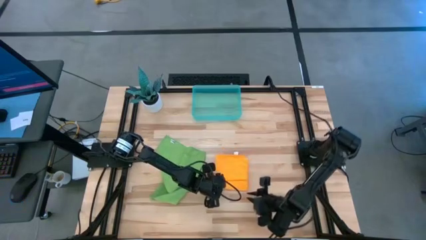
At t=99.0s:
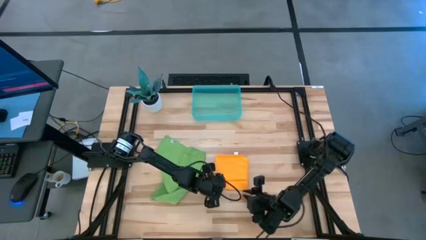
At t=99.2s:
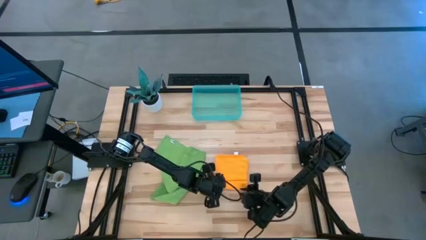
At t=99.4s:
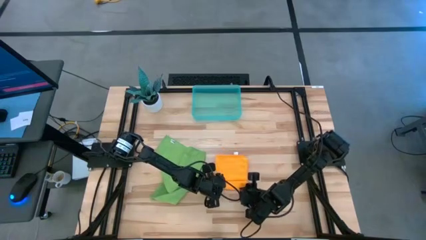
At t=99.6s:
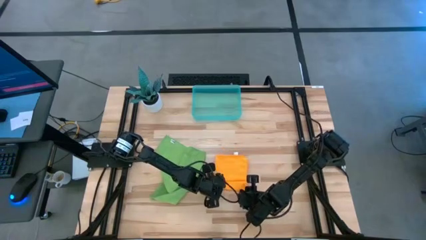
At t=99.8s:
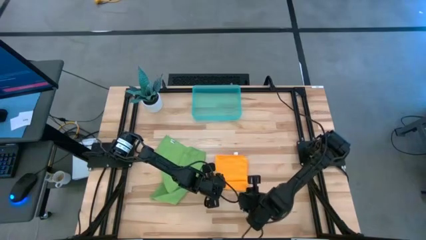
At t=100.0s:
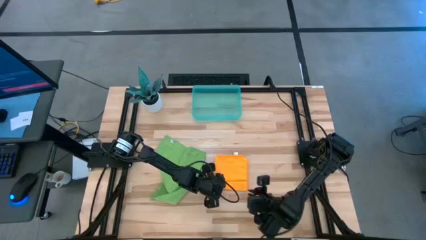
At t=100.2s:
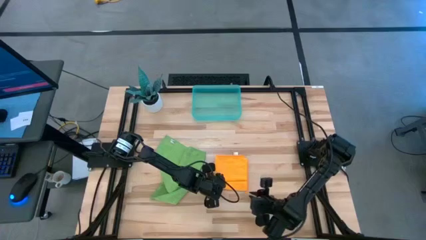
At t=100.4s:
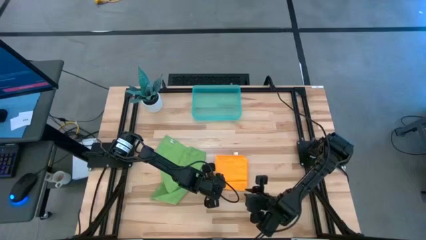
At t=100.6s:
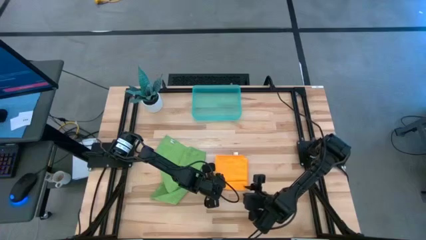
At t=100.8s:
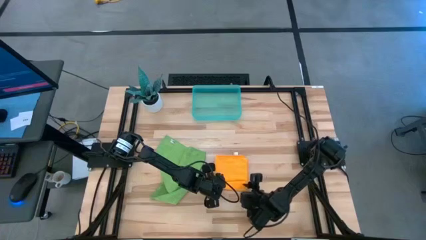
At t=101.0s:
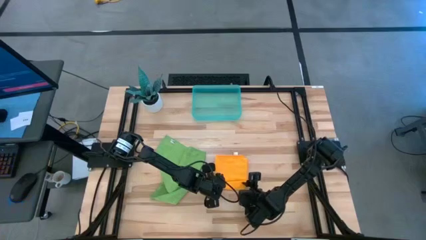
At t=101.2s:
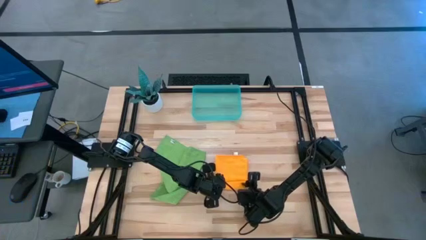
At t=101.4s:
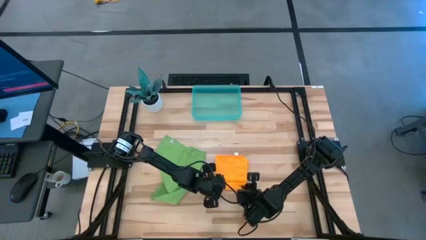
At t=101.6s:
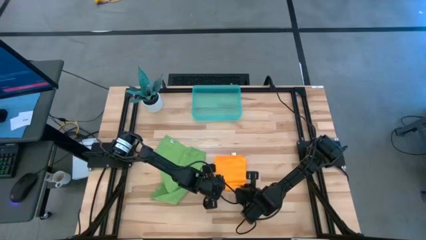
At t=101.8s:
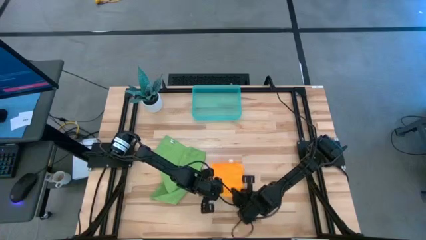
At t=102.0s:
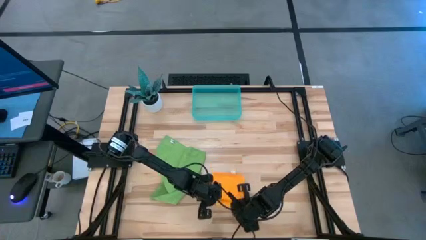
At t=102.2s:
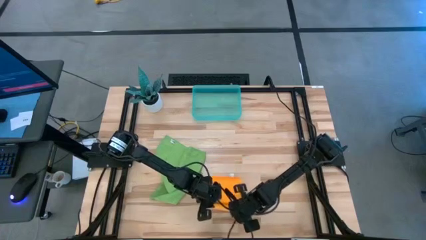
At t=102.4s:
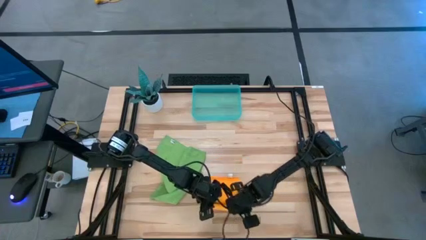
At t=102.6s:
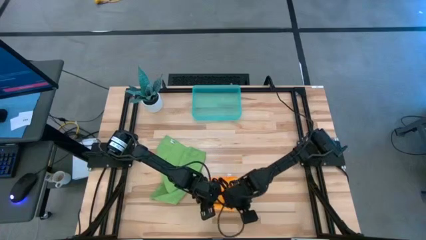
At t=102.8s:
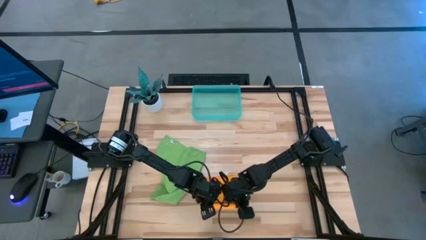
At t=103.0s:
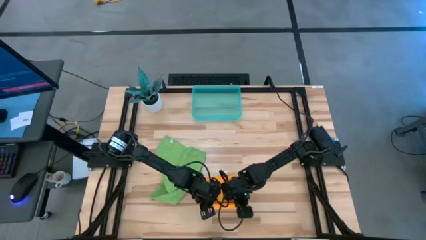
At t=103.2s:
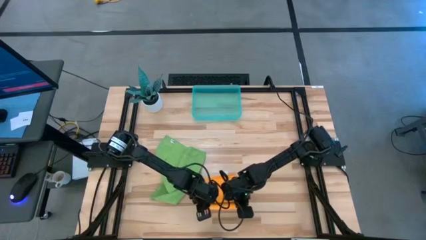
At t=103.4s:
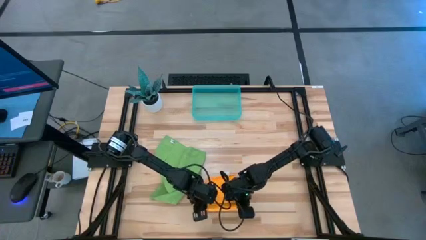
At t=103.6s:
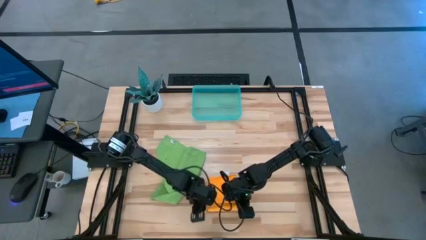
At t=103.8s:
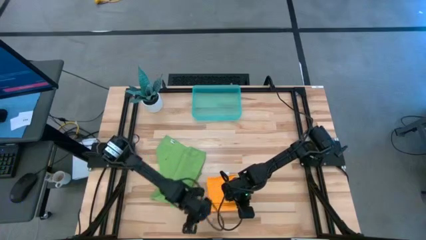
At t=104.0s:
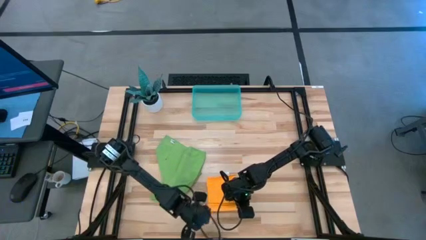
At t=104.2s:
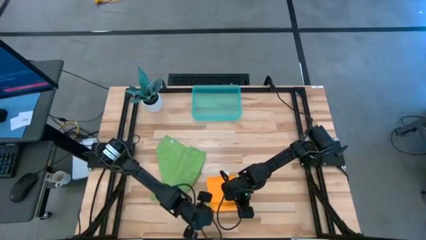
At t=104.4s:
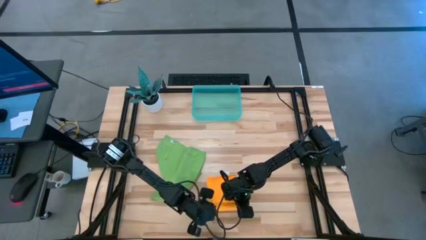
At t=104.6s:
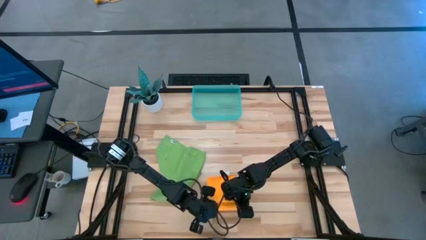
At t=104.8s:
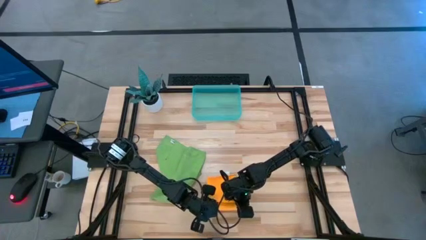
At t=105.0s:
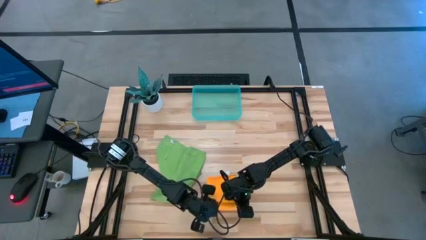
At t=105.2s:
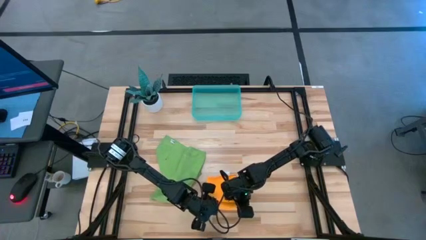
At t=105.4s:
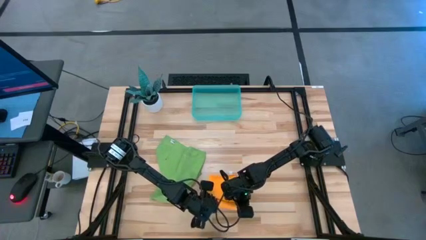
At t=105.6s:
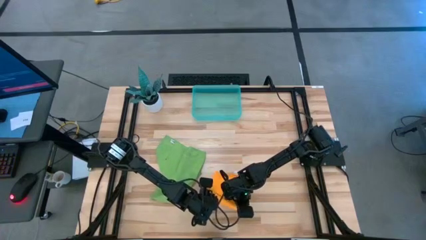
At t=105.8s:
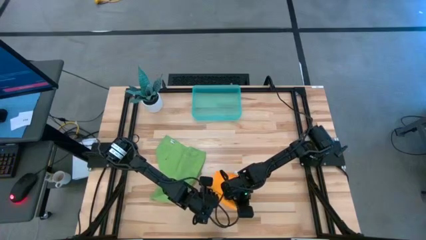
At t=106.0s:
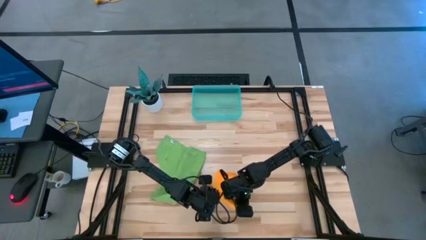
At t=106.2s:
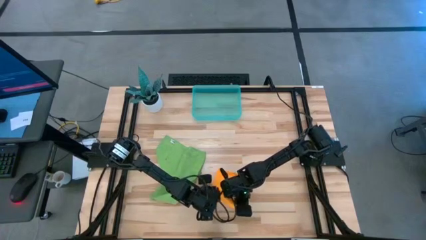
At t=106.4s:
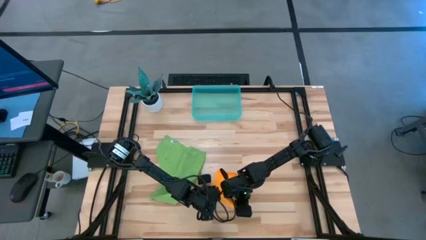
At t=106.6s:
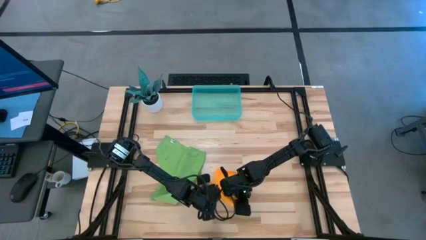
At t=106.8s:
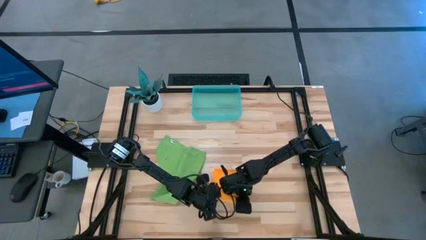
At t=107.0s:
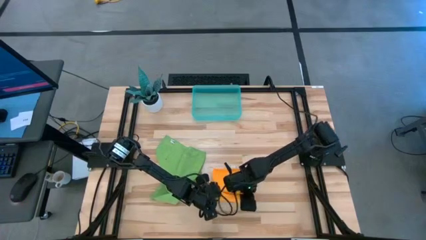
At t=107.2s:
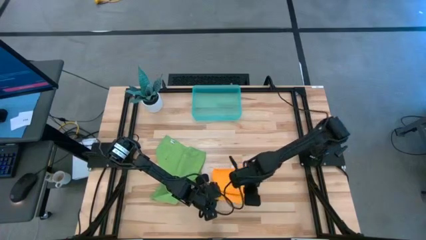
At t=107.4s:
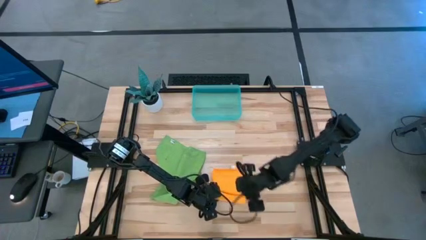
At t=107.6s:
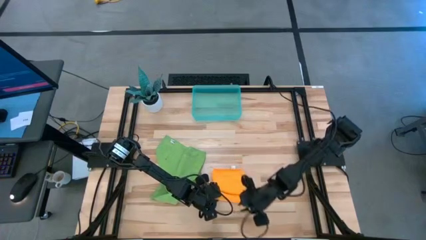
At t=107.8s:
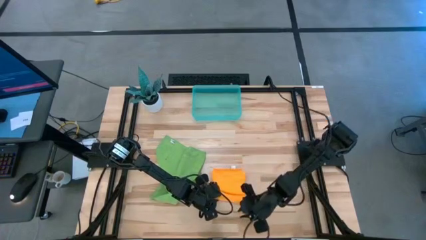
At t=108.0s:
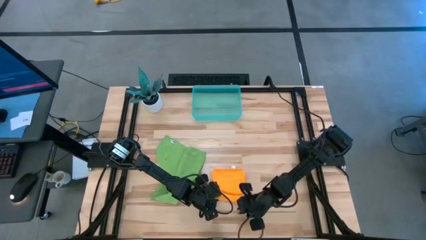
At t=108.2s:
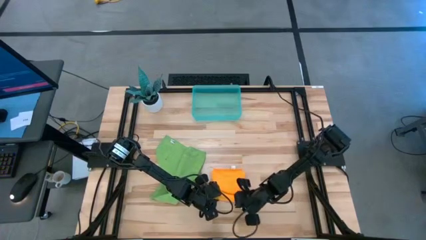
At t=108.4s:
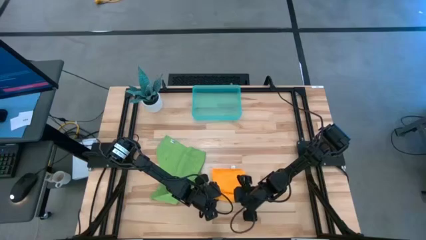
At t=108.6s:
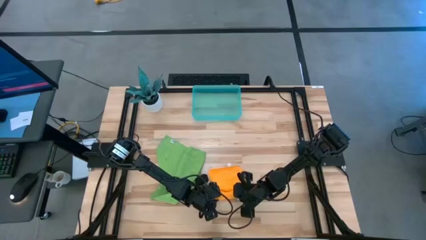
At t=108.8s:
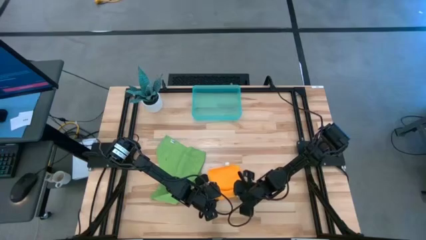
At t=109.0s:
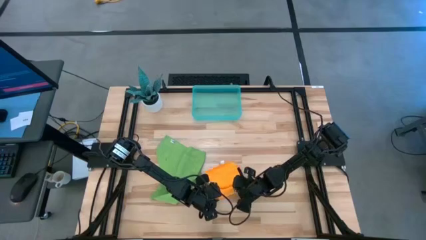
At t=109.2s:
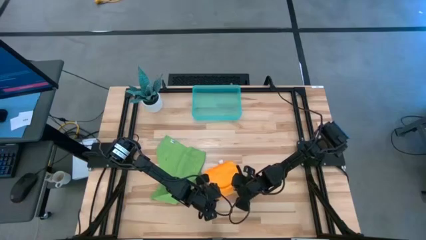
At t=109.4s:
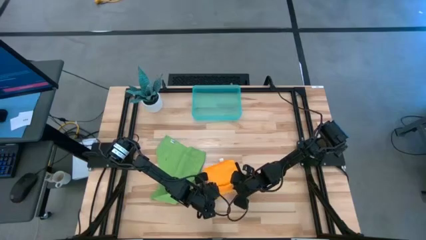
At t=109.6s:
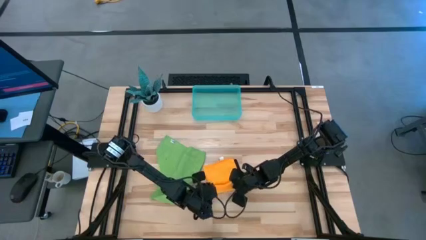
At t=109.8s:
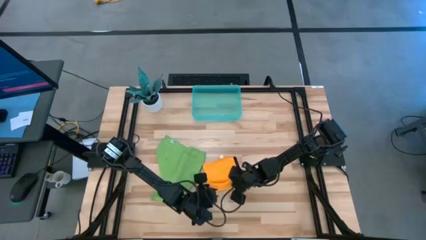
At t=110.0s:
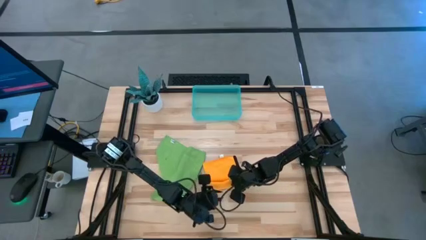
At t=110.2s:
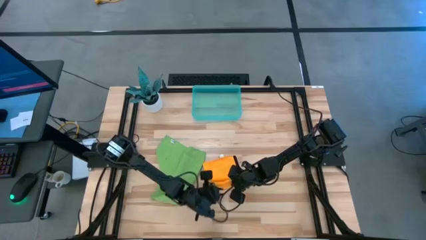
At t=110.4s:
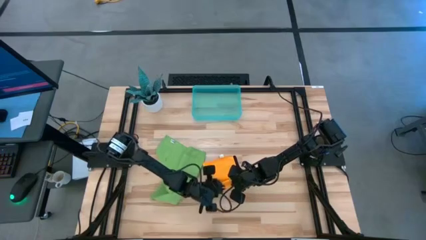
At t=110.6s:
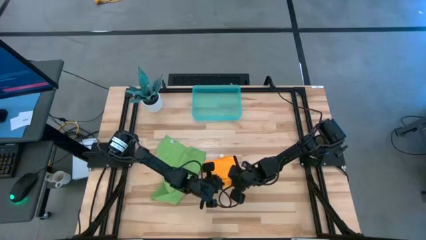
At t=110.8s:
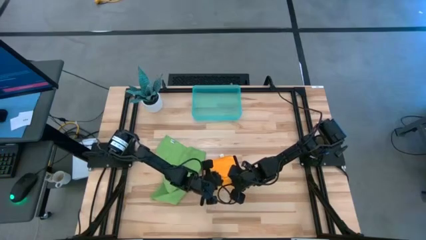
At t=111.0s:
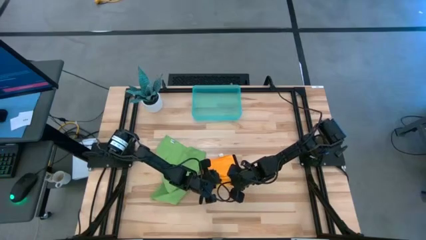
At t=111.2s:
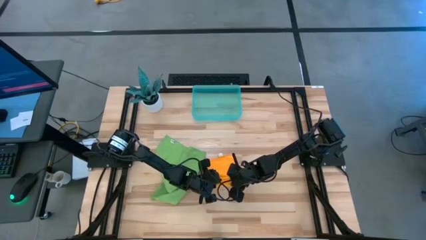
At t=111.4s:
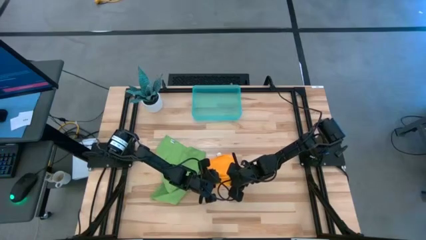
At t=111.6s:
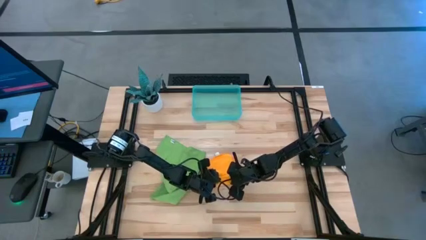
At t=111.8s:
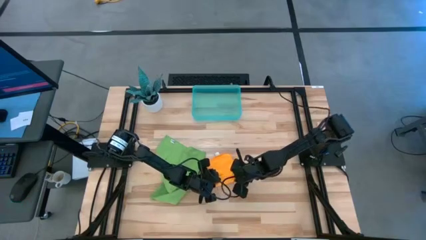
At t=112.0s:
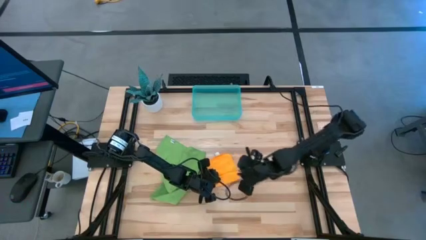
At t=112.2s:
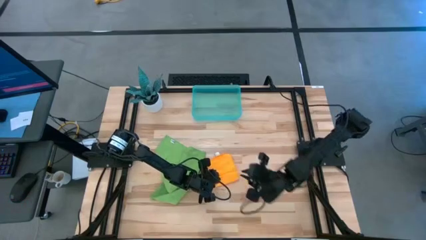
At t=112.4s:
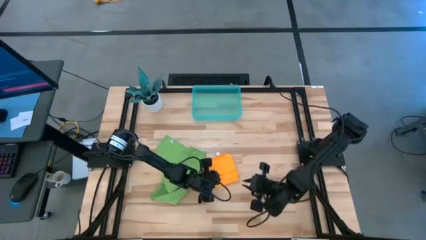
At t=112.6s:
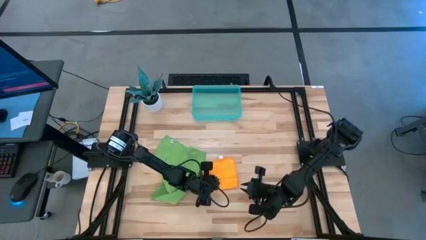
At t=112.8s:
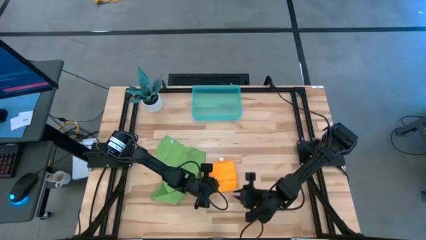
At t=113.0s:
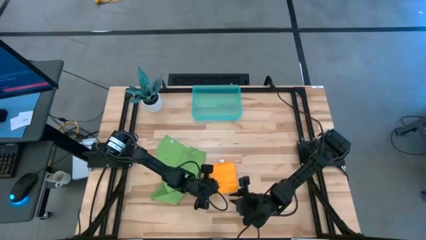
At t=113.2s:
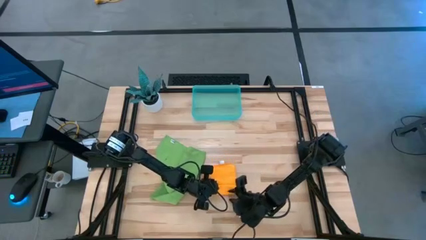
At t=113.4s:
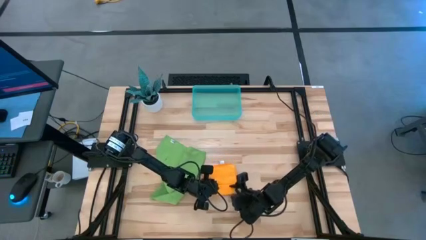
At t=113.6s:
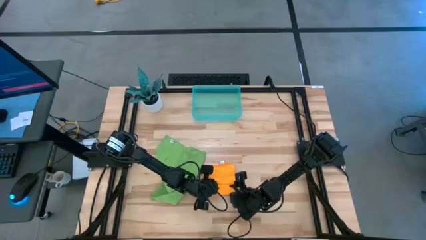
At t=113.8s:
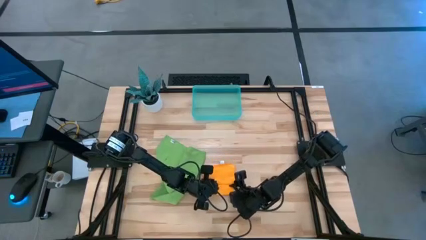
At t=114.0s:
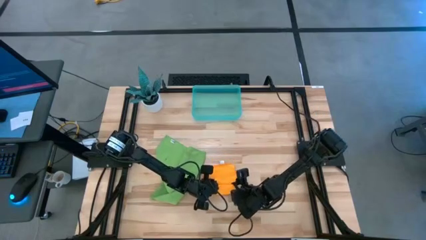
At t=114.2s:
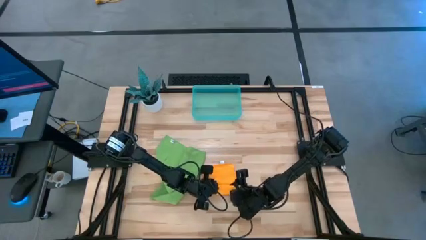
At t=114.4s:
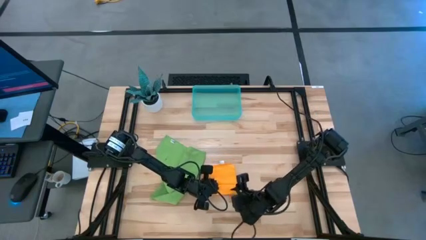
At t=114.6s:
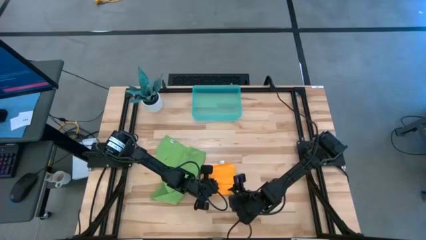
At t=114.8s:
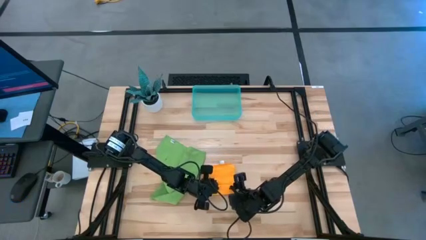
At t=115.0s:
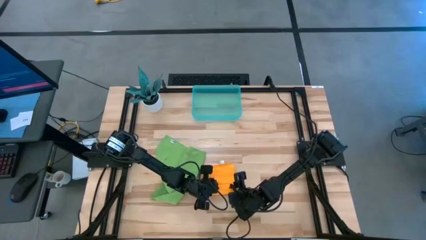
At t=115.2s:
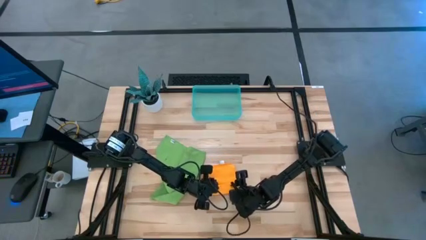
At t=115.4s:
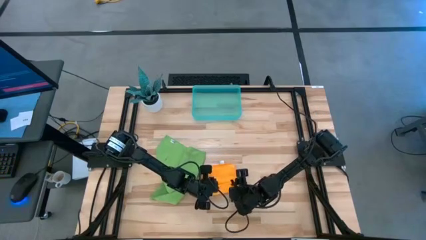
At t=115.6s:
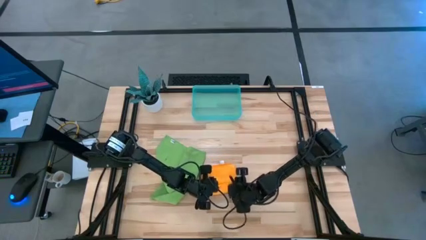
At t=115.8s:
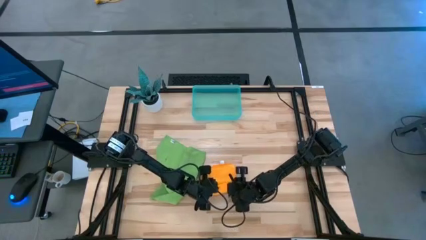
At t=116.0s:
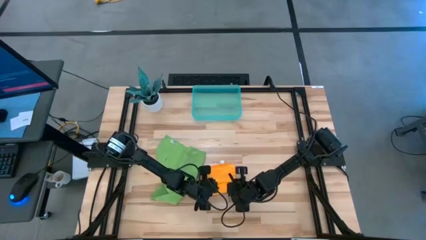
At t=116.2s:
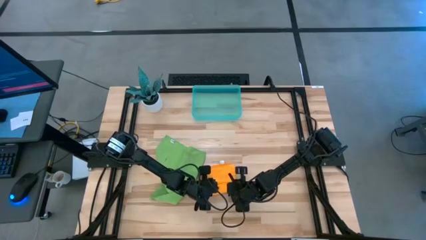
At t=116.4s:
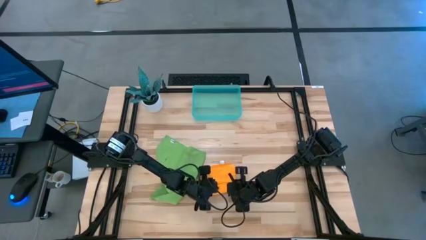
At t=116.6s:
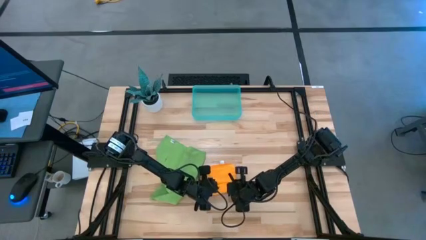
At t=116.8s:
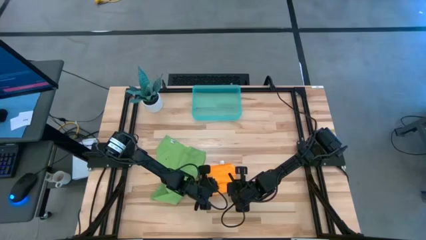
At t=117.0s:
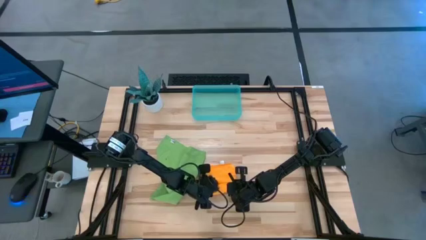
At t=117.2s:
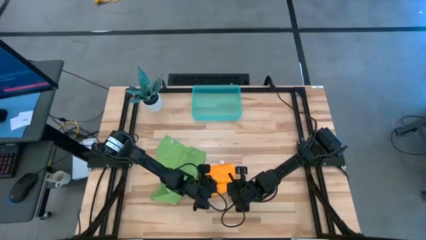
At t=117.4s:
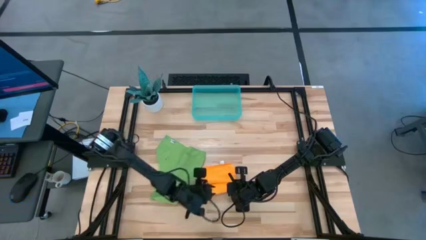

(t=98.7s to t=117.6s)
Task: Roll microfiber towels into tight, uniform cylinder then place into a basket
Roll the orange microfiber cloth
